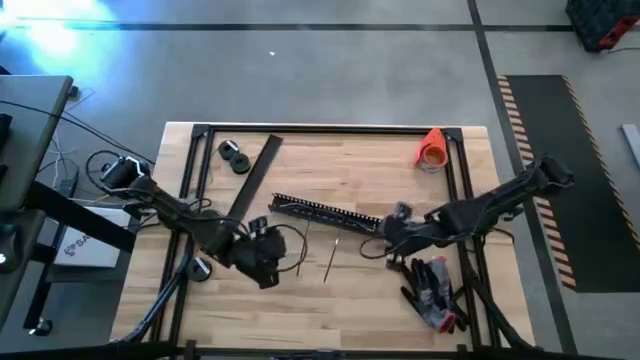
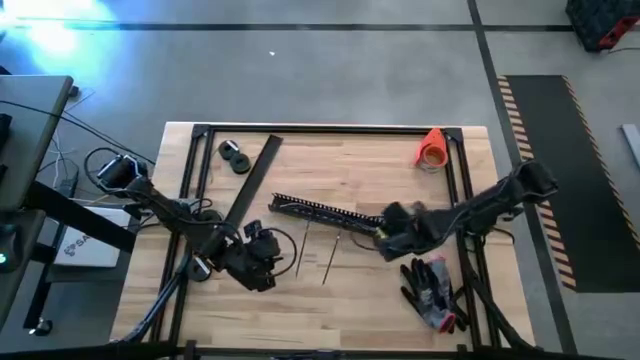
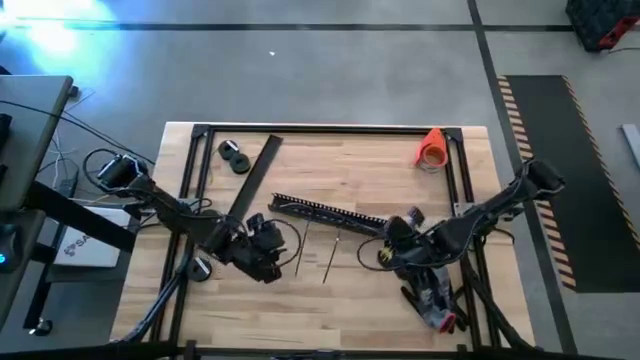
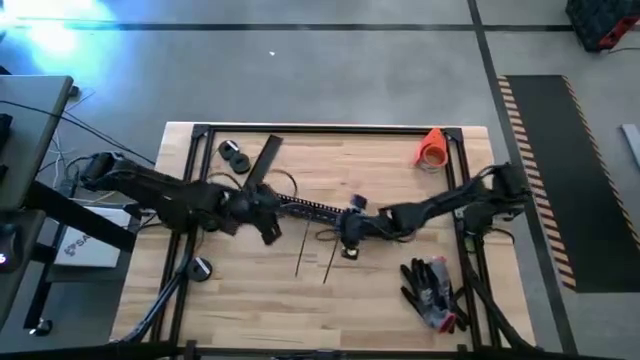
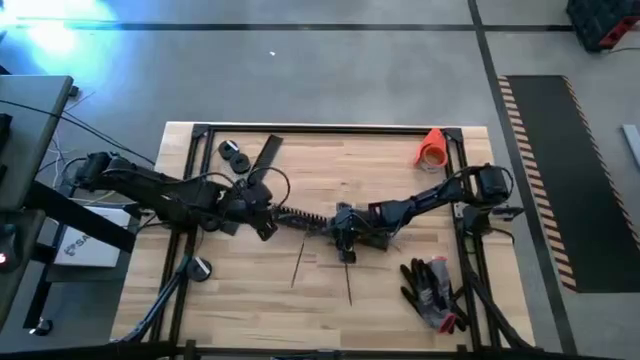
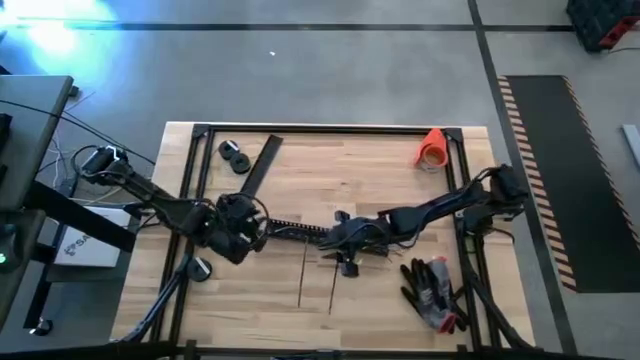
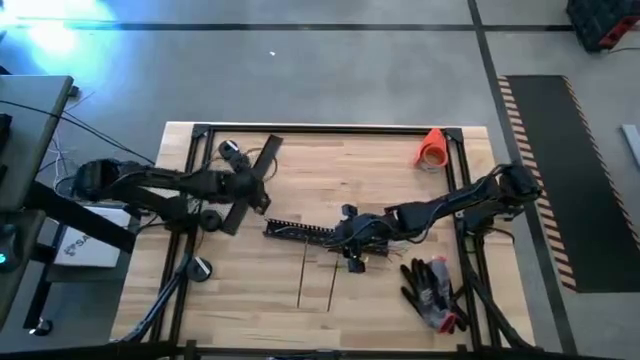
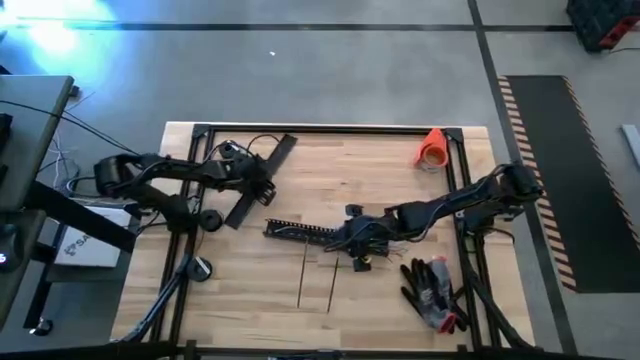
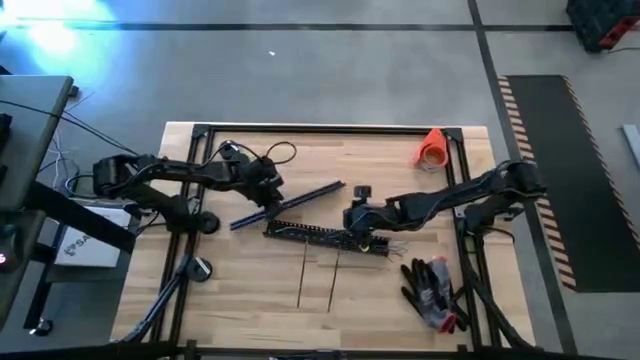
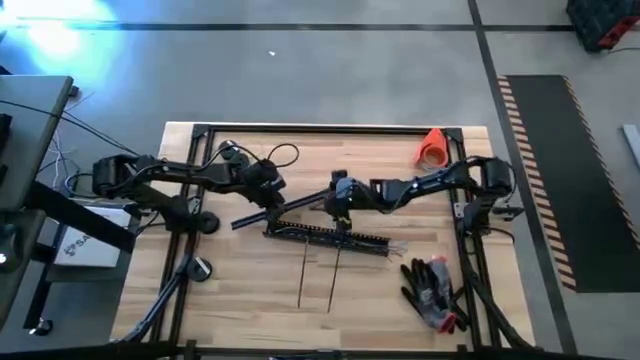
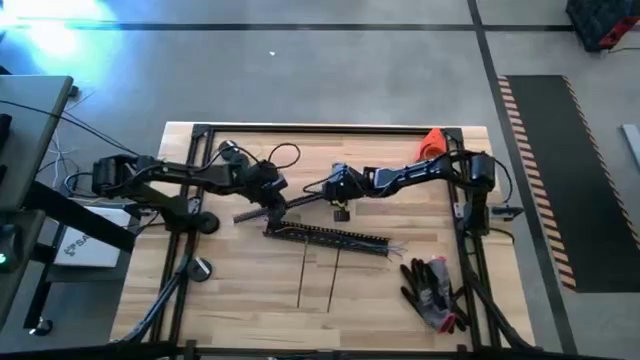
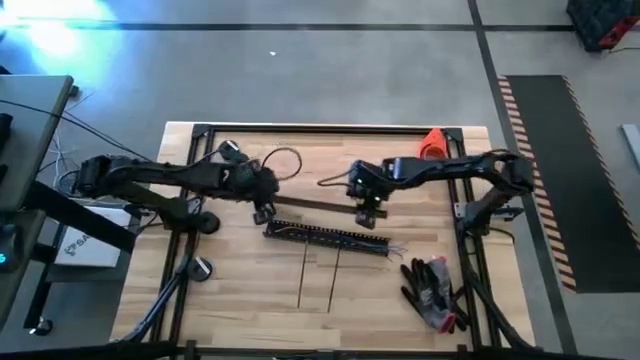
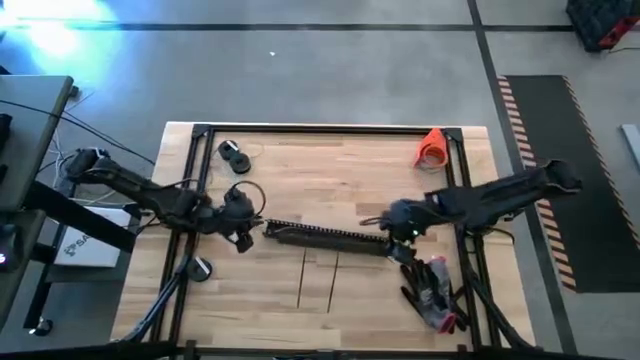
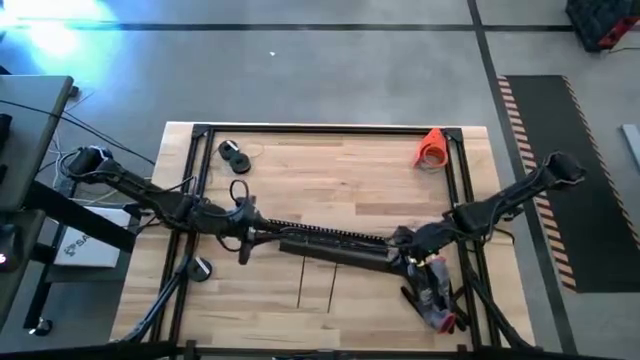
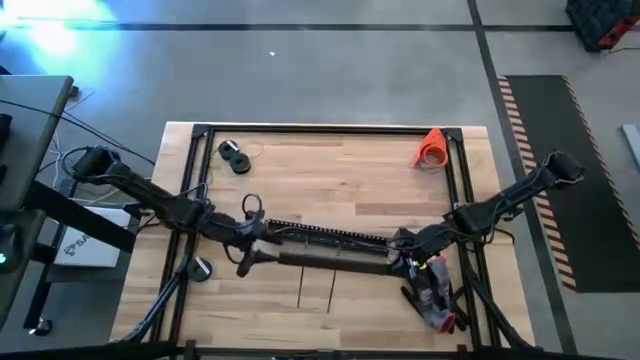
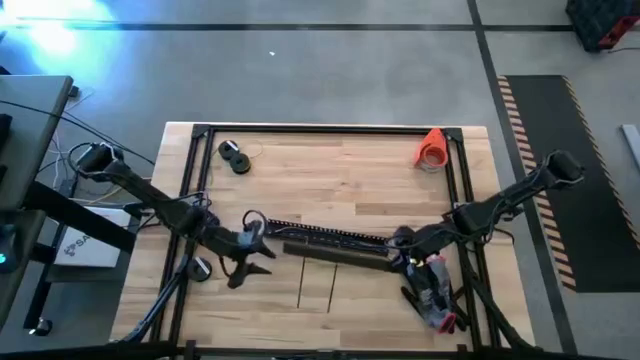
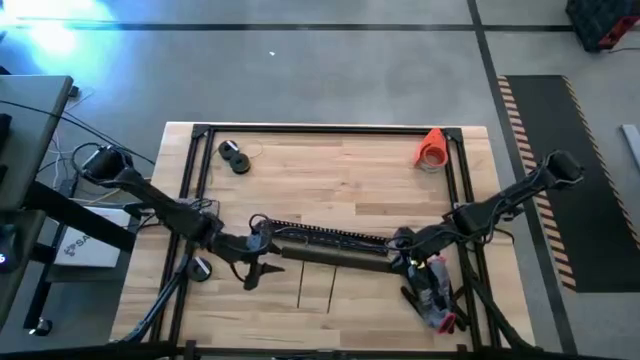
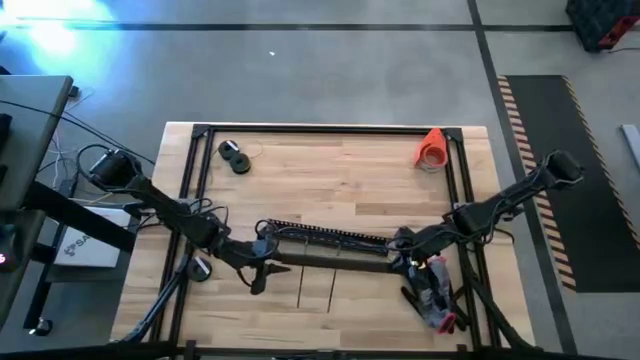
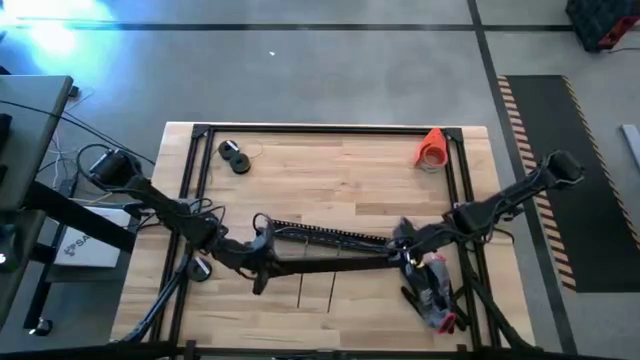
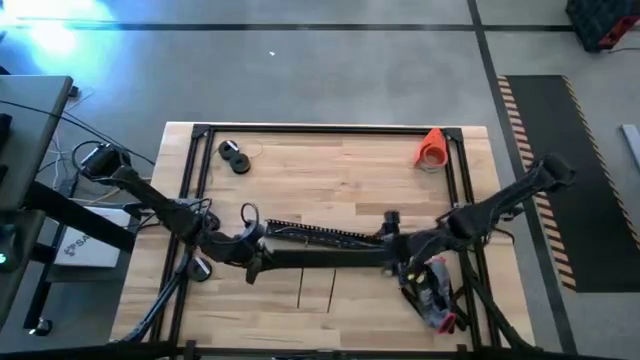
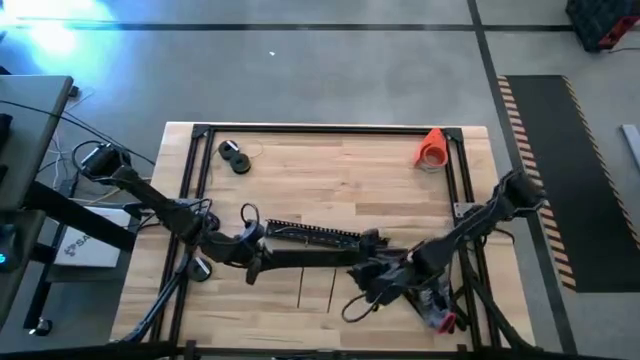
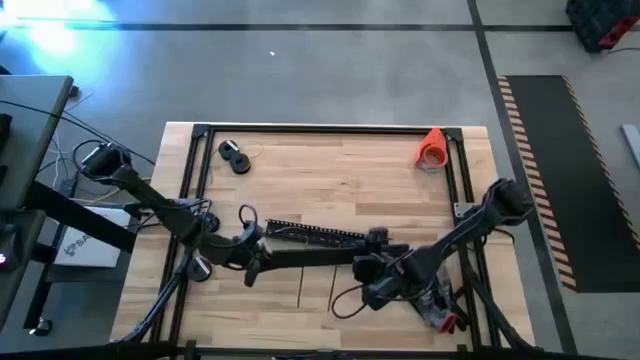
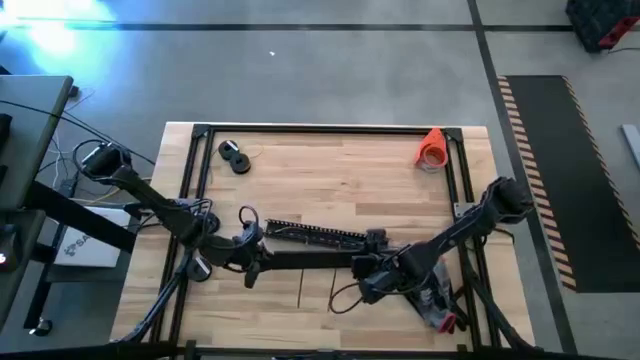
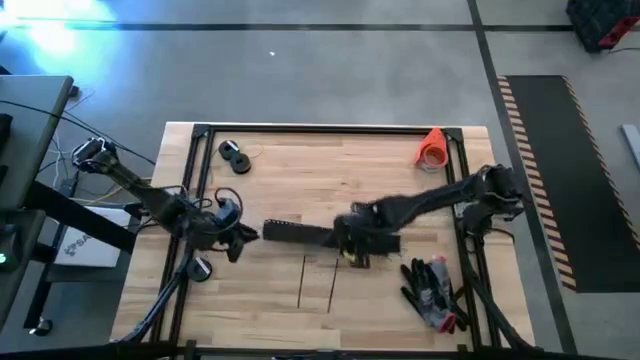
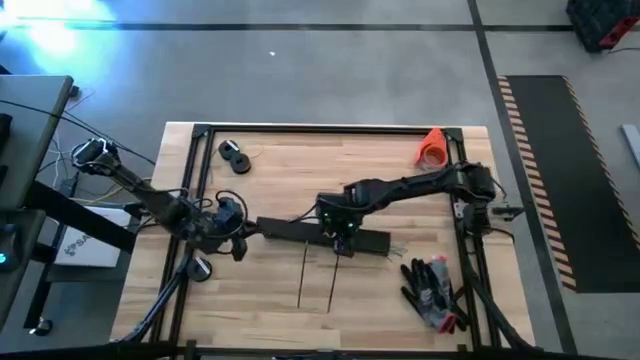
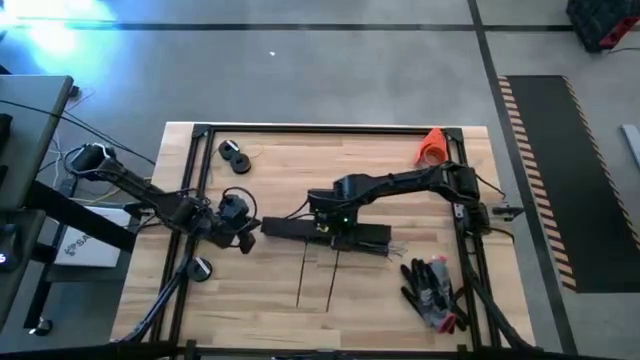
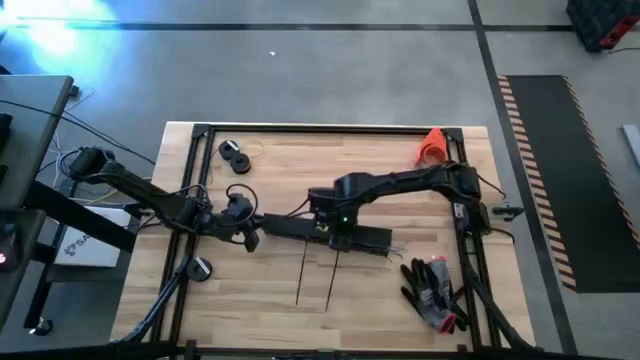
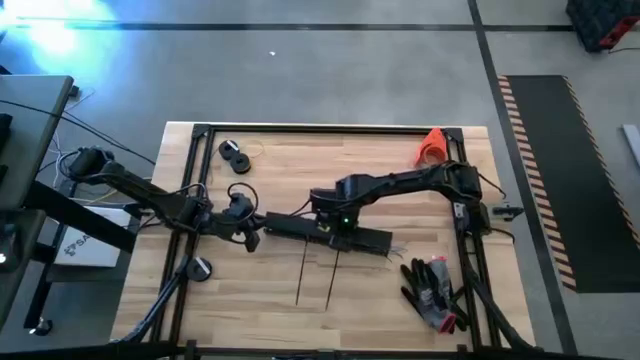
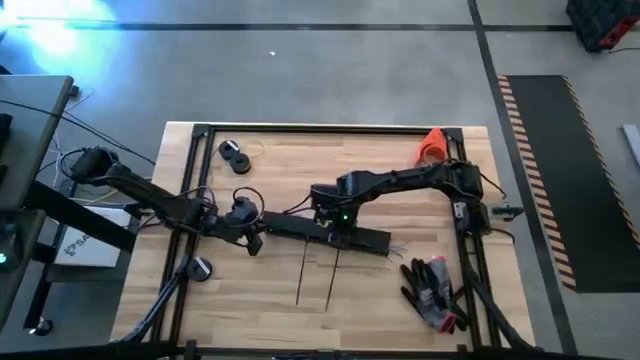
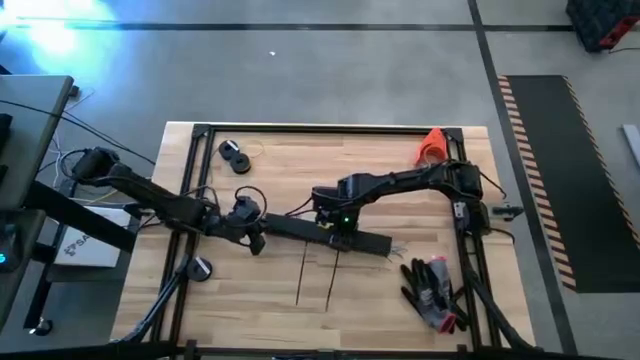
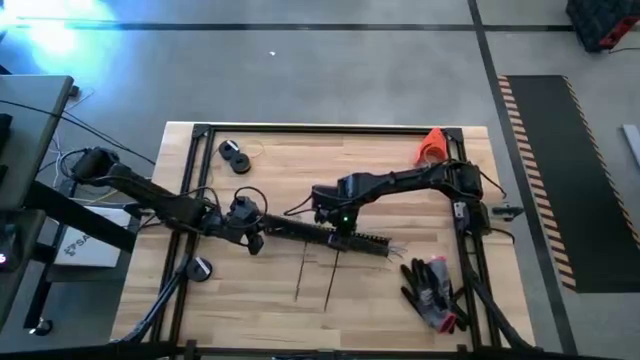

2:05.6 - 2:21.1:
Task: Ziptie cables
Close the black cable duct

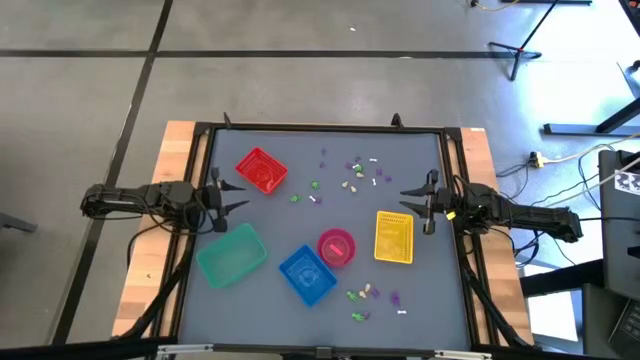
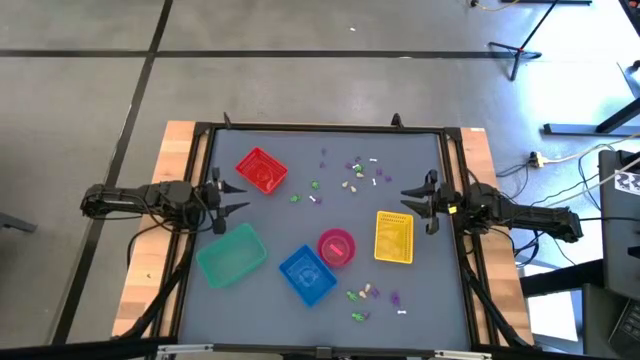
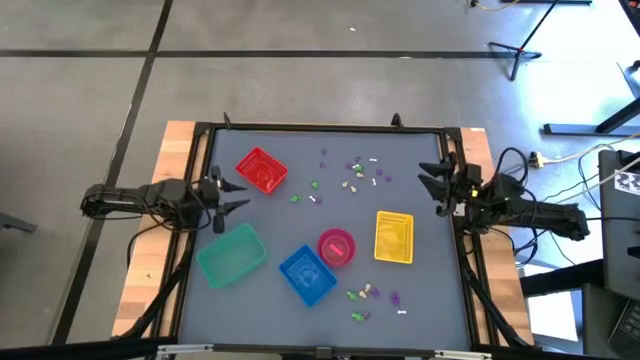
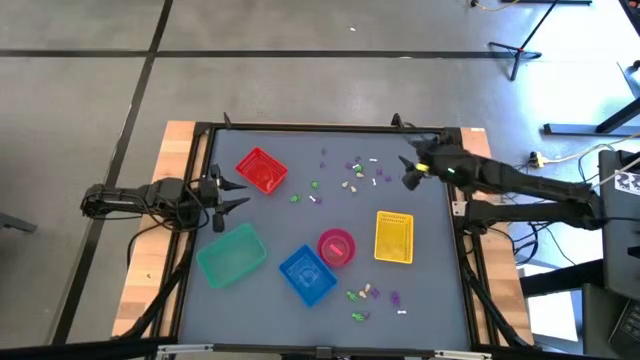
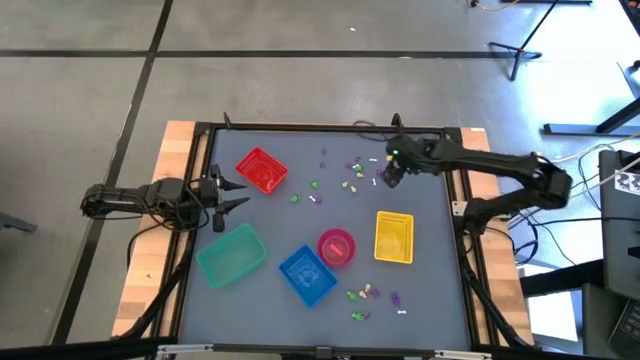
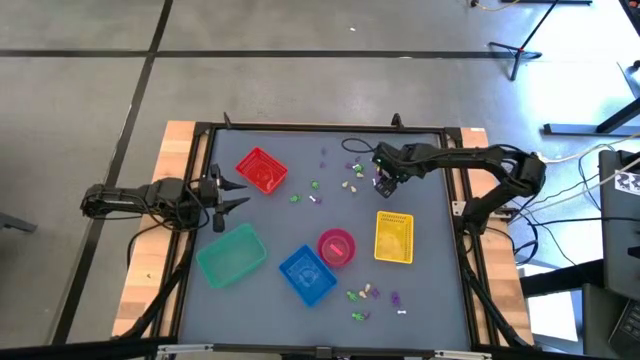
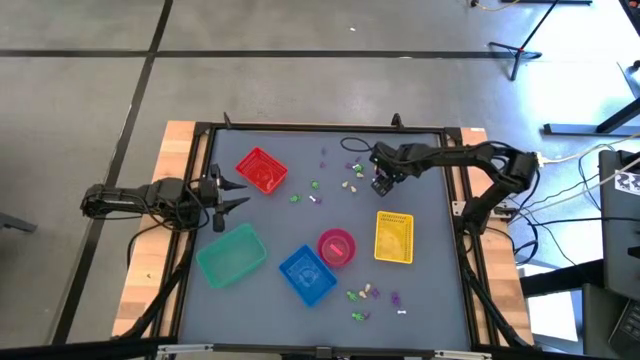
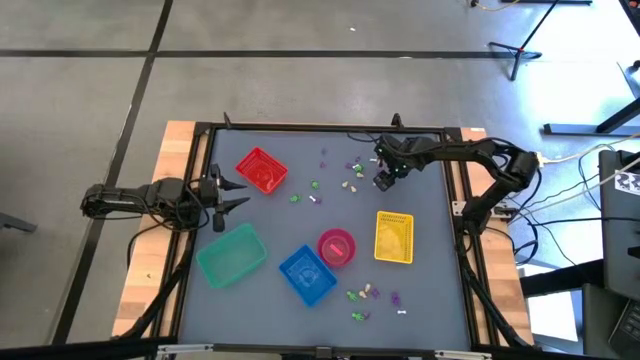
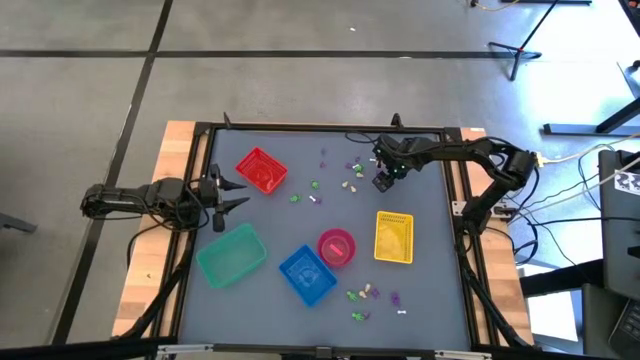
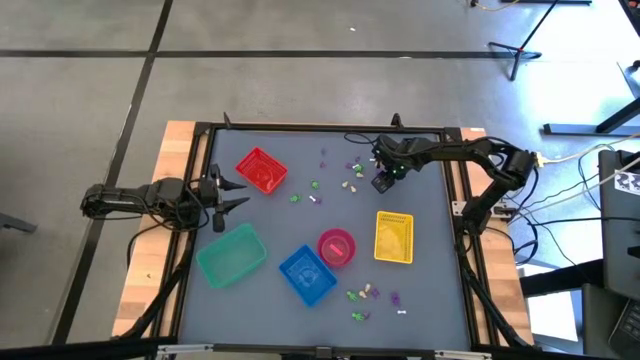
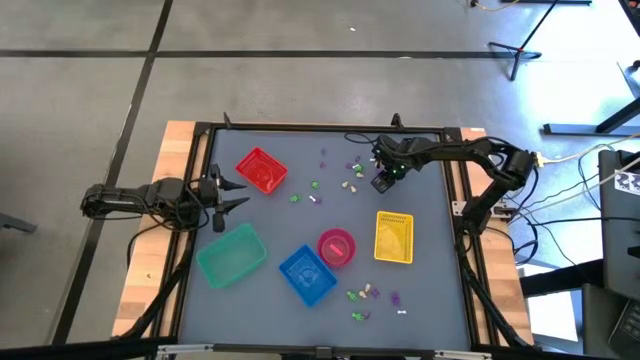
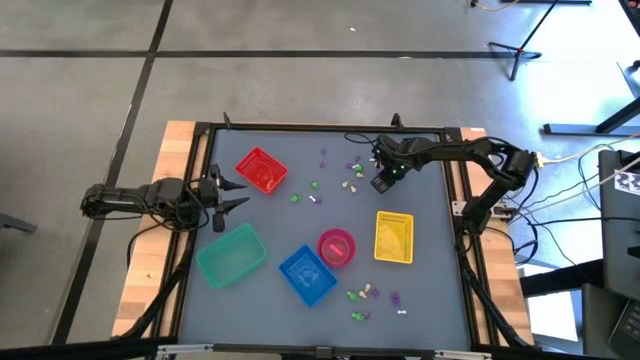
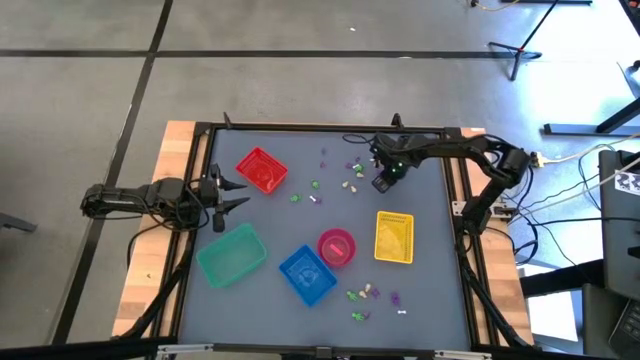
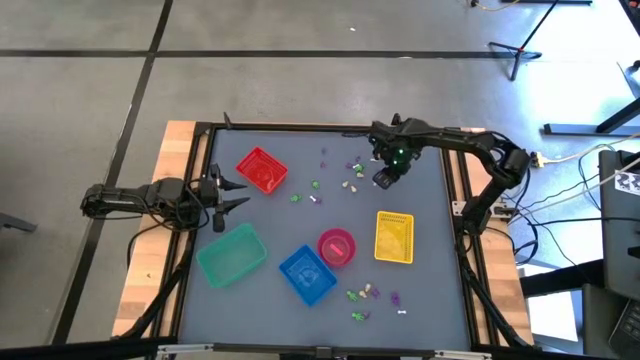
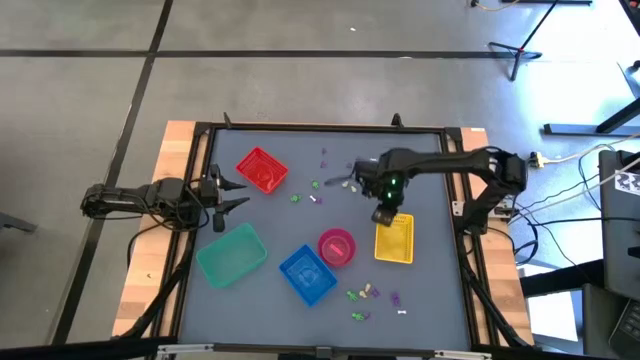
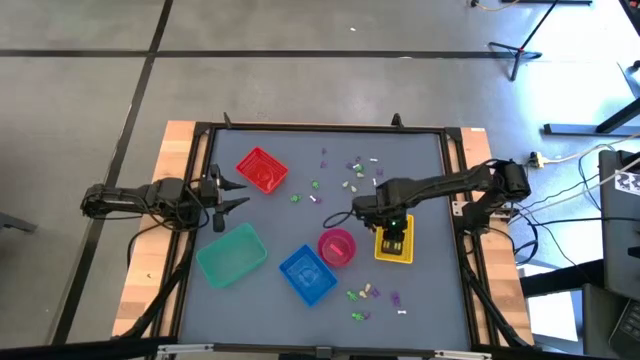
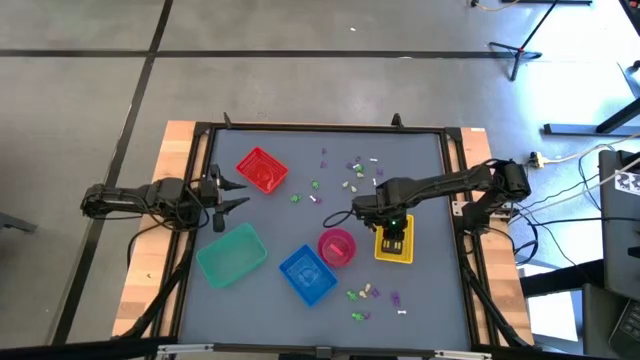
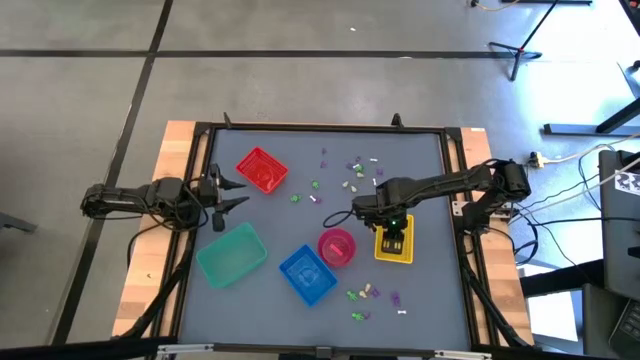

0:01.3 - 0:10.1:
Task: Sort Halloween decoration
Put the violet spider toy into the yellow bin
